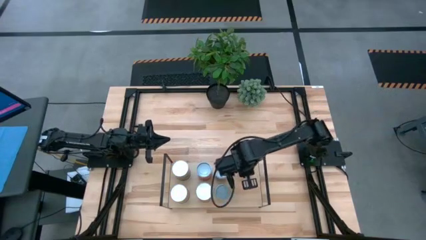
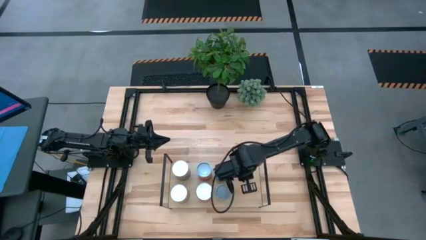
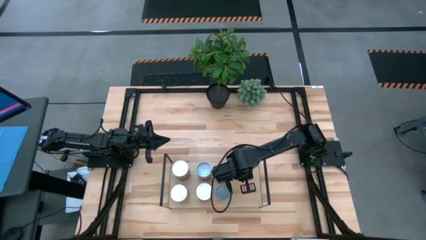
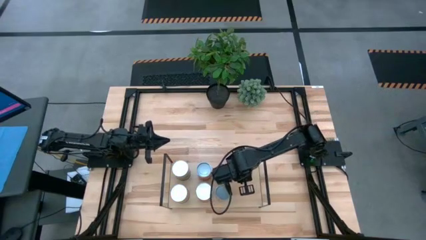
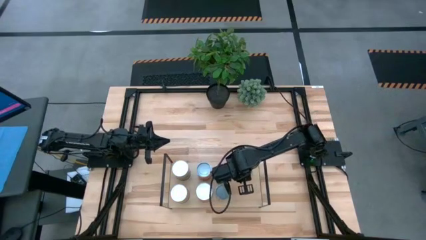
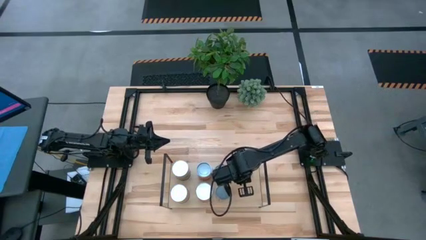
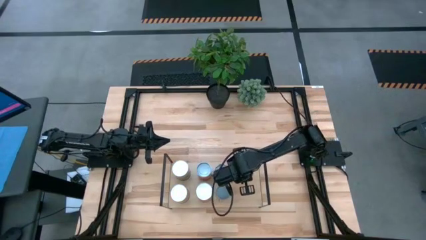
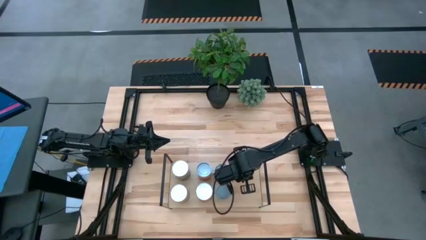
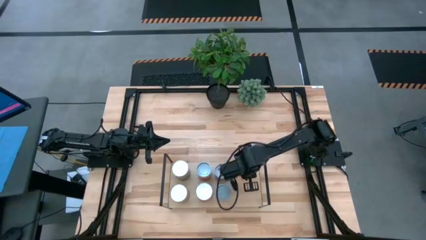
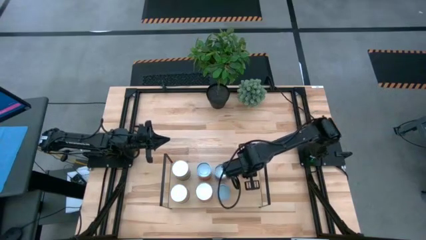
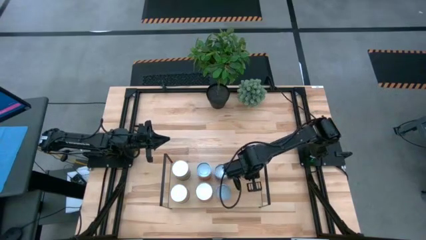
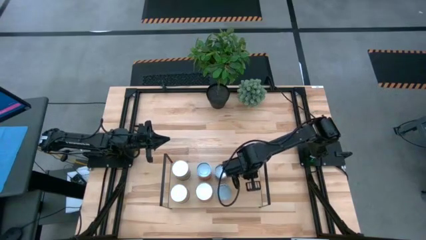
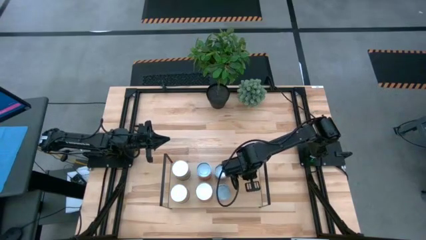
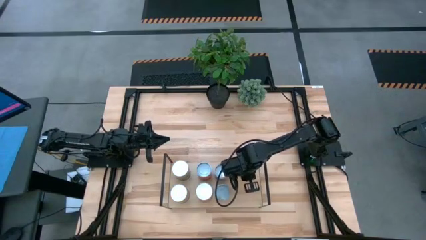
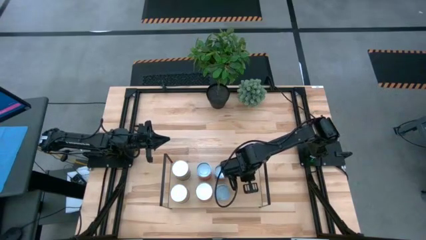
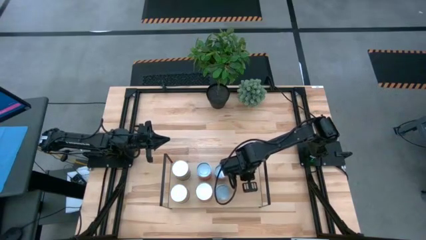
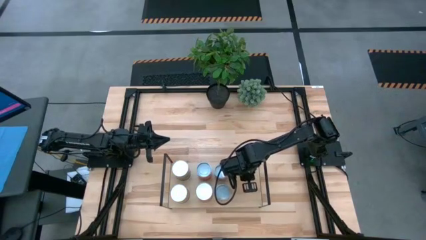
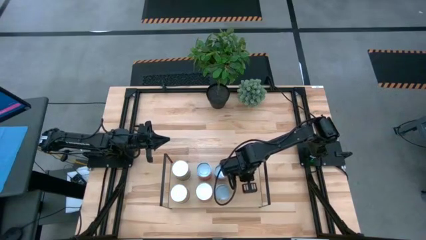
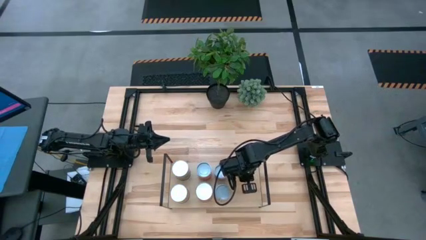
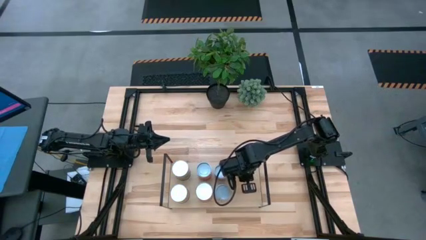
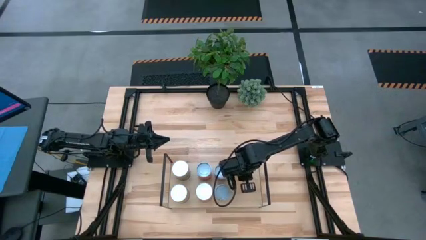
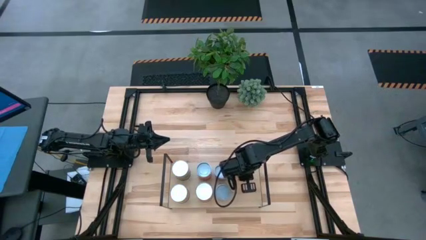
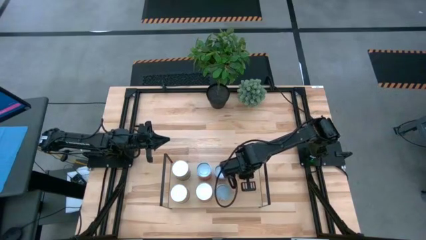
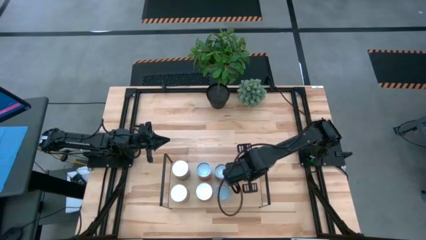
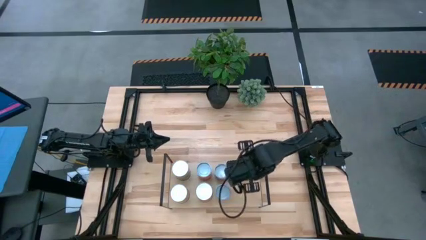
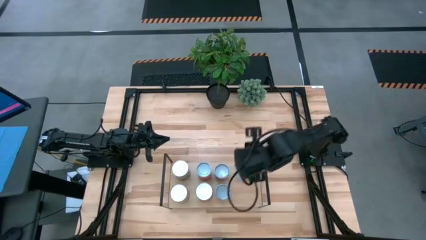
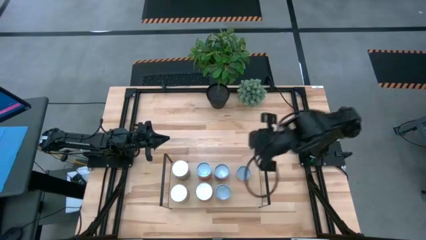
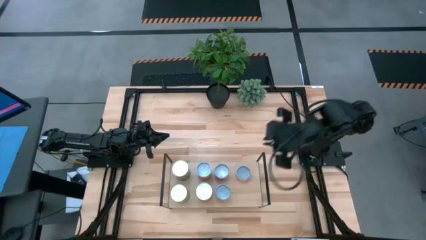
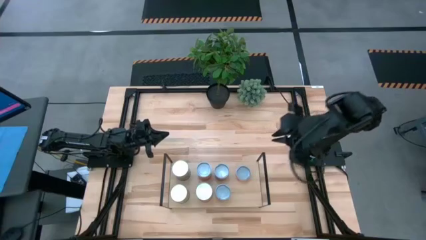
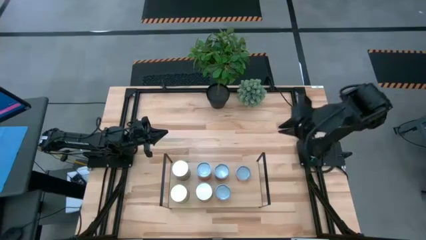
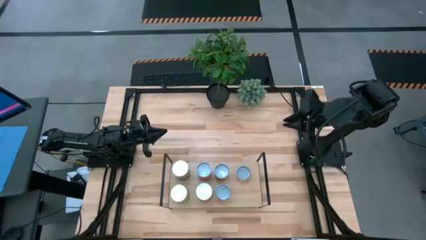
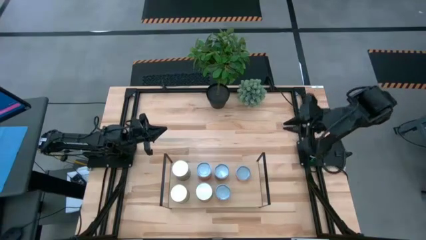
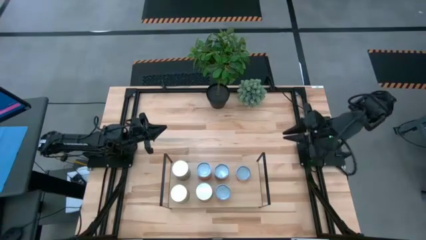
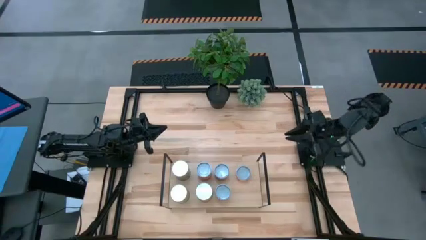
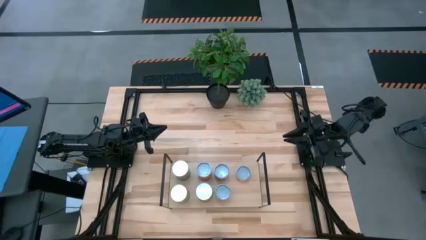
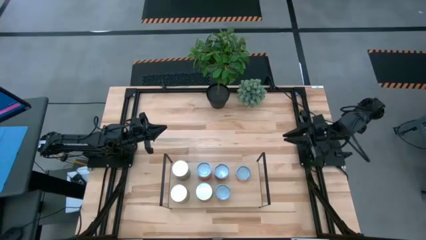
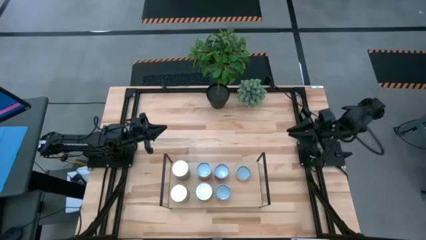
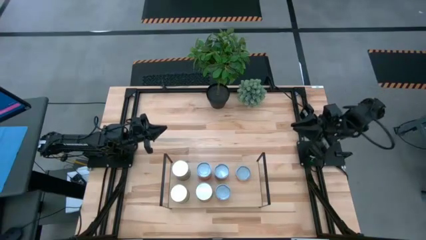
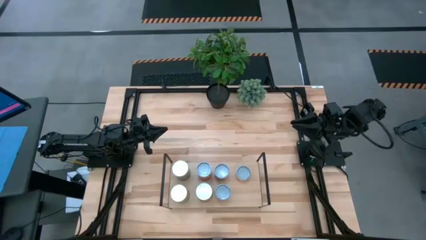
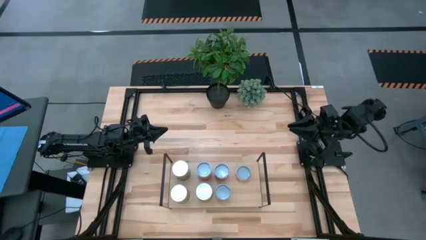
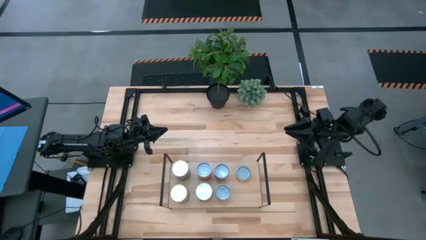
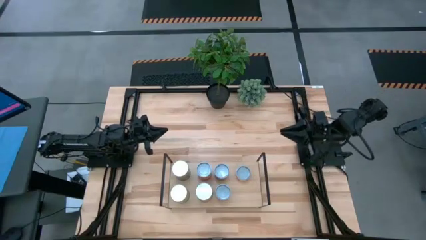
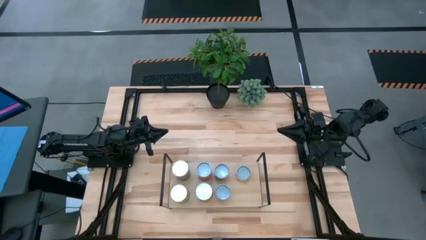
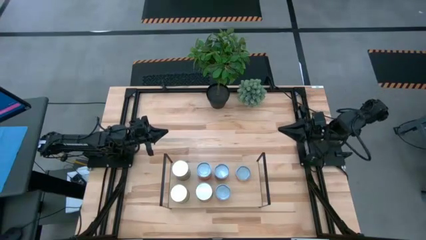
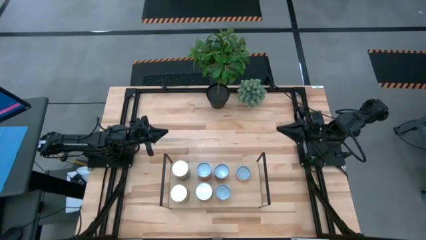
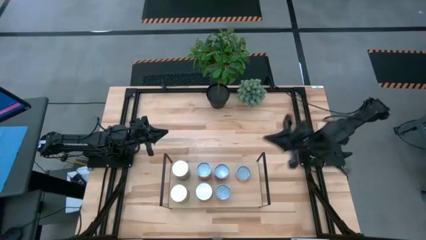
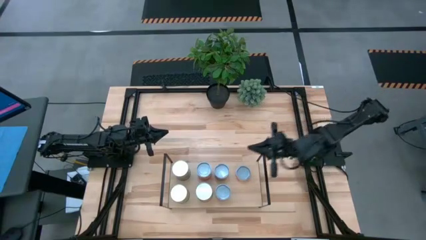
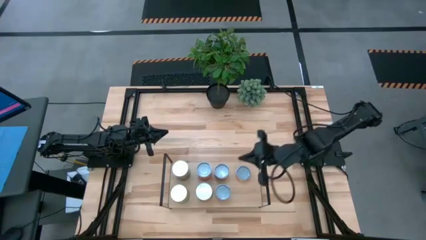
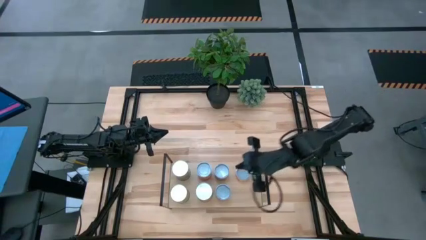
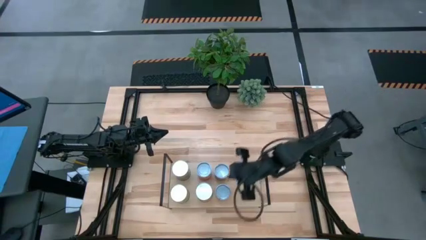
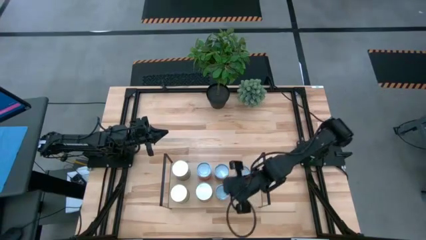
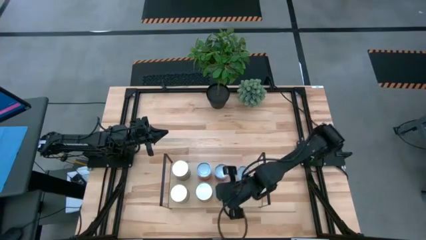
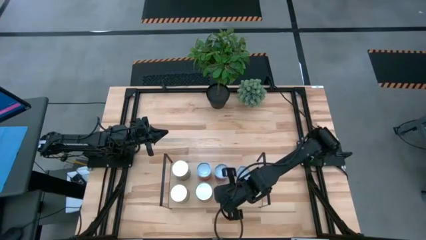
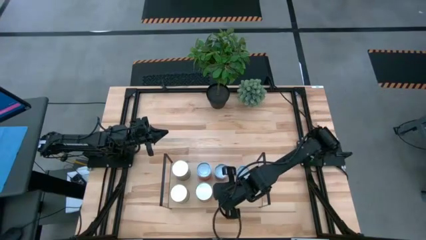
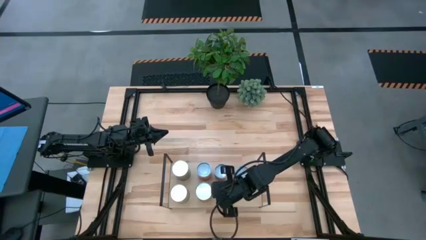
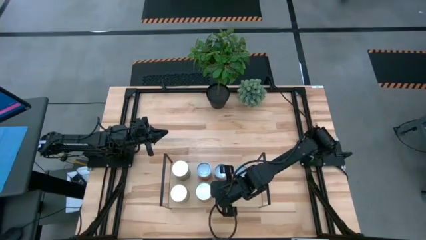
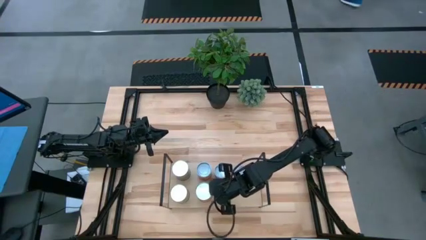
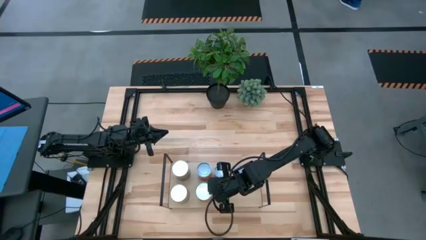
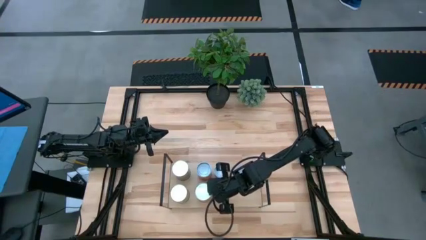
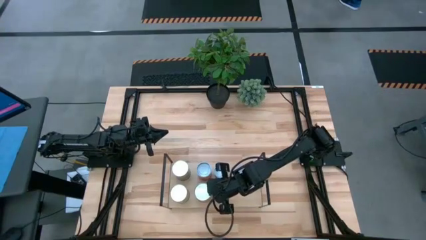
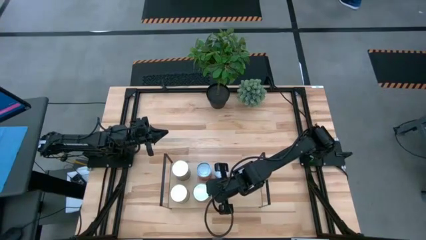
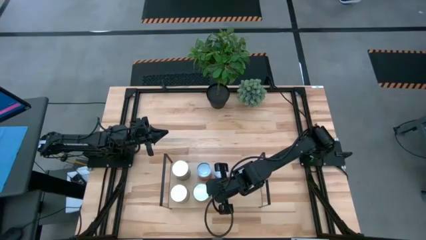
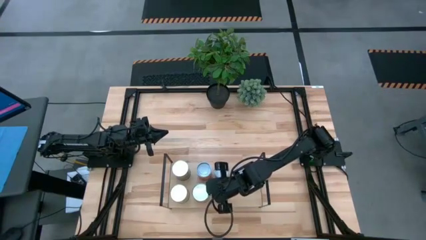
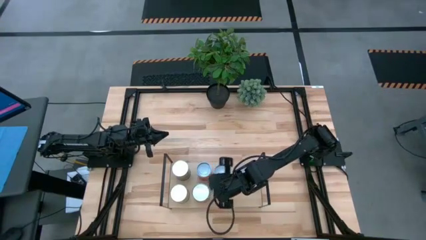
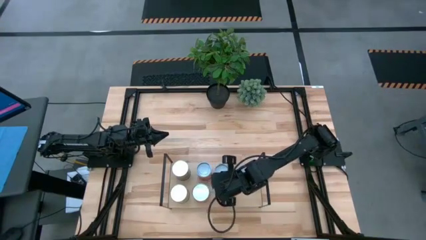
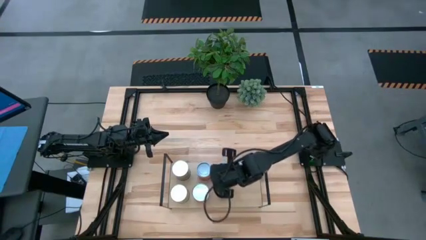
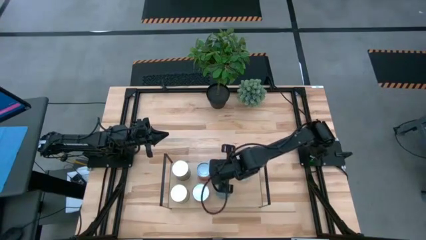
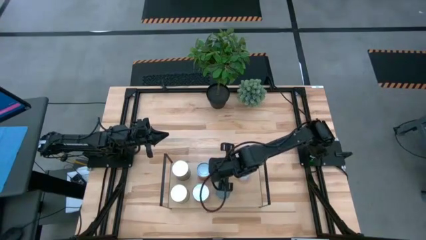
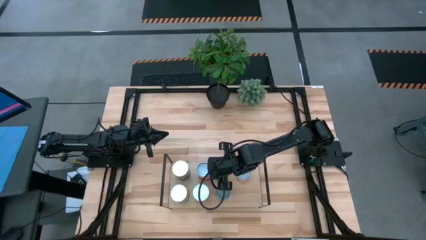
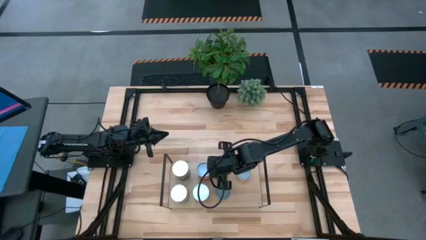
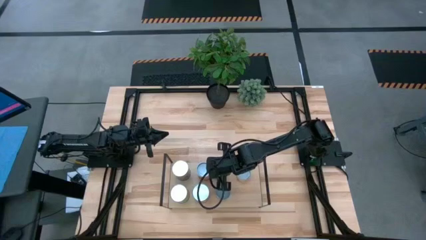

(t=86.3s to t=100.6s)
Task: Pick and place cans onto a shelf
Adjust the canned goods on the shelf
